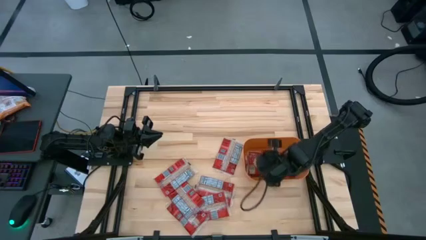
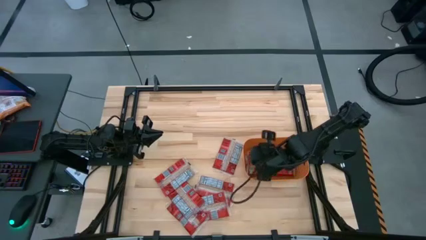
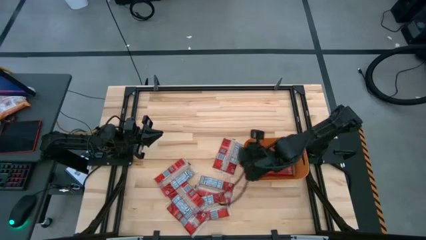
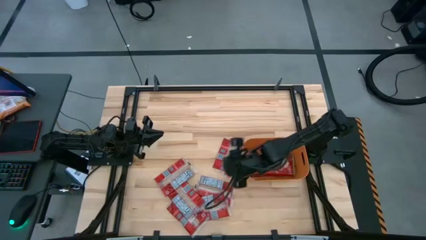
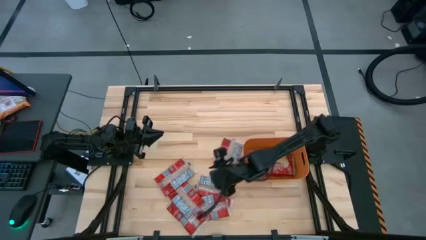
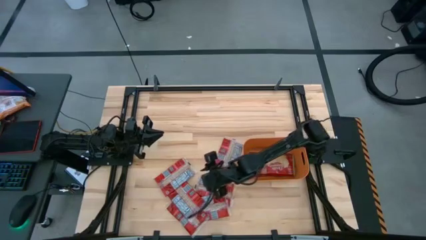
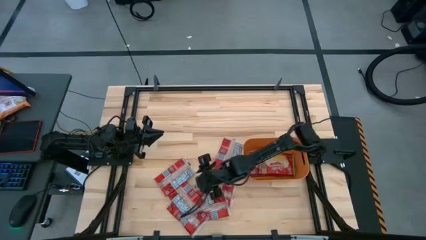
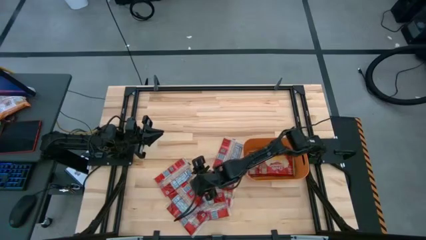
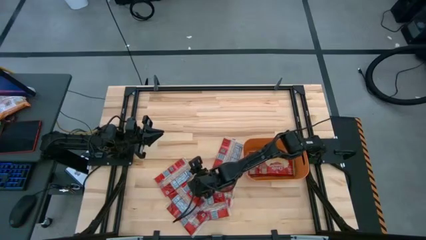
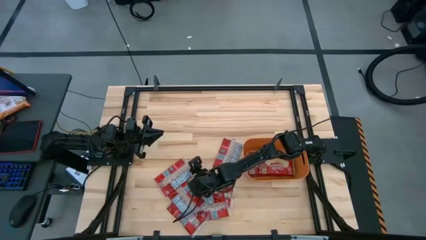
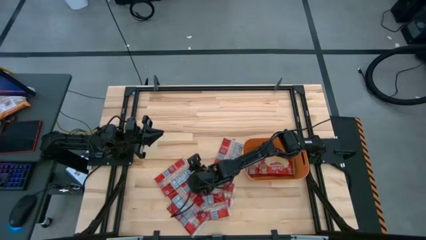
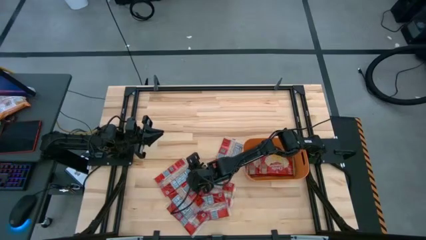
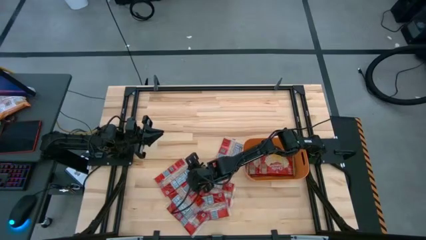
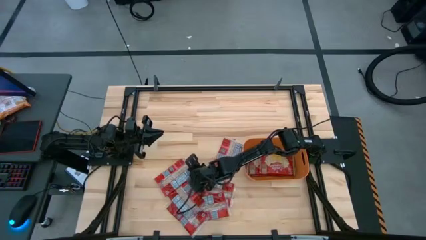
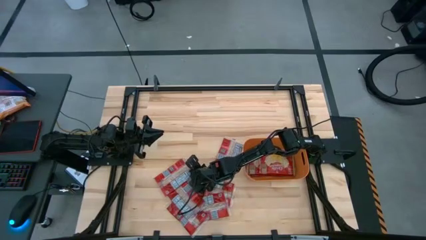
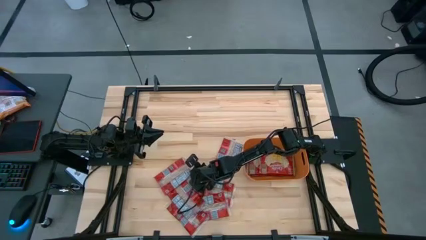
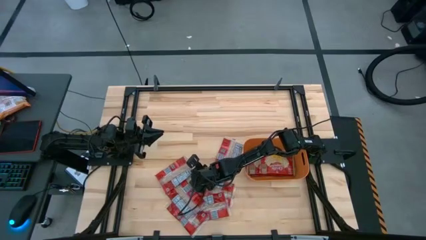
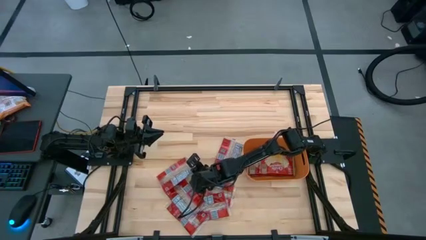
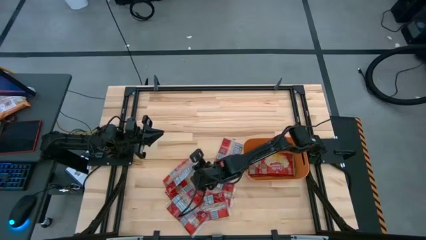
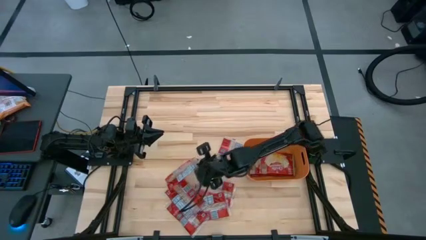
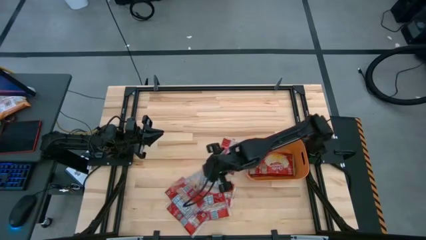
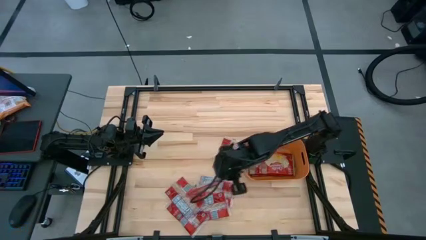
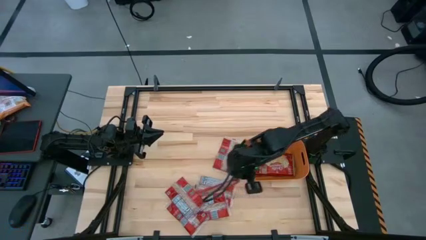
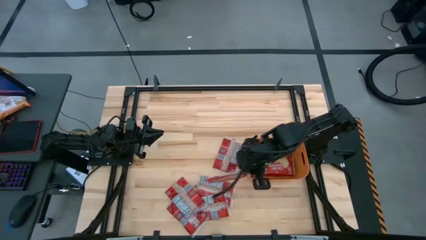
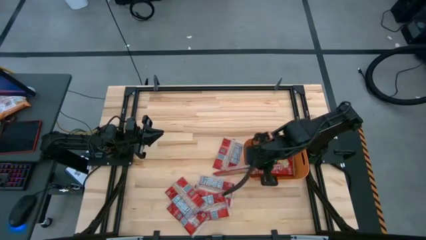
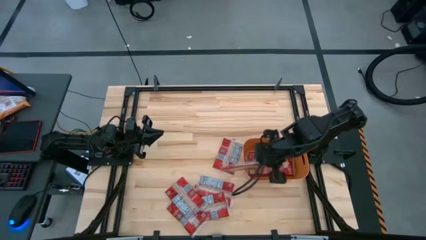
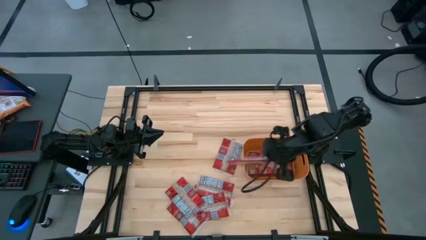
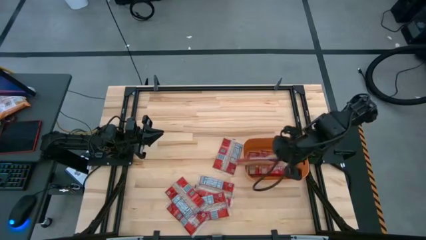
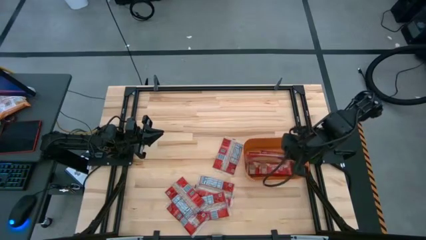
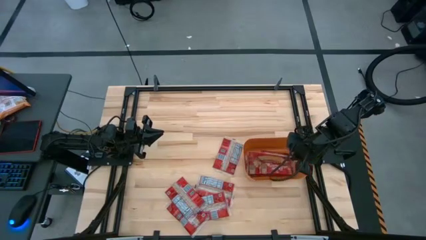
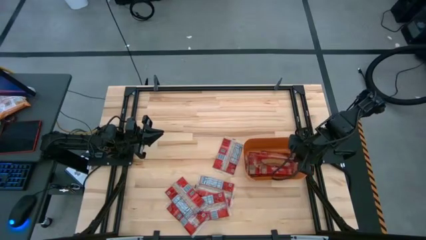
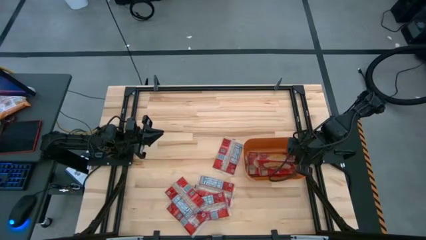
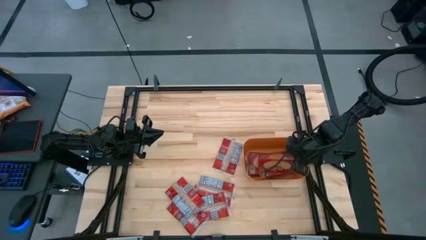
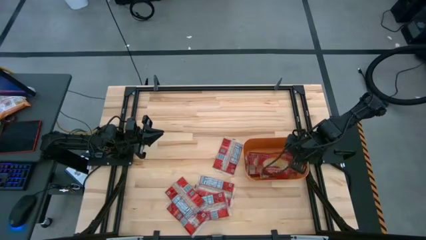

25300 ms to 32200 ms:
Task: Sort popcorn bags into baskets
Put the popcorn bag into the orange bin

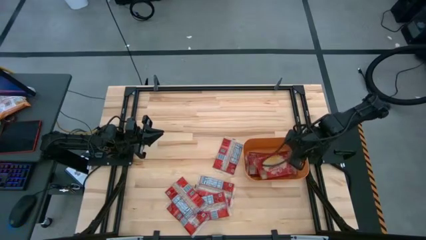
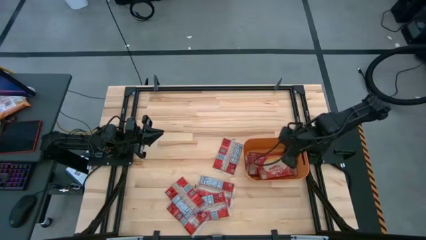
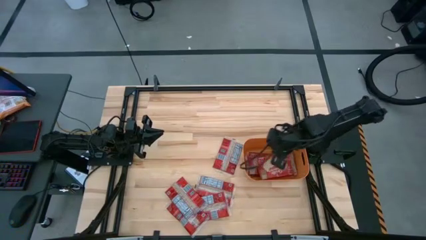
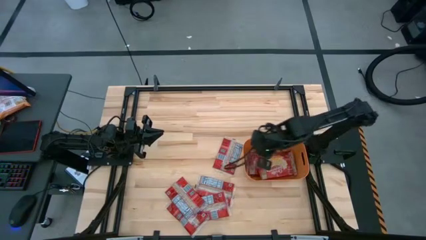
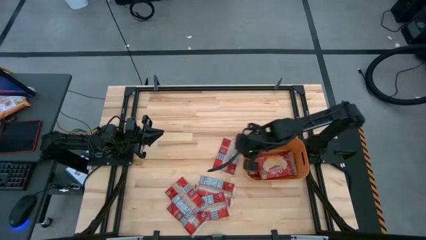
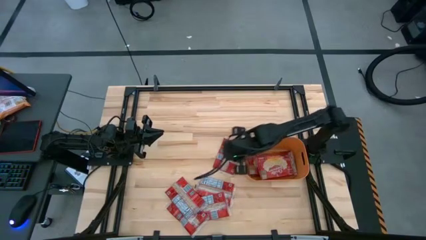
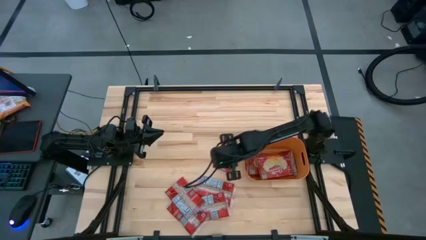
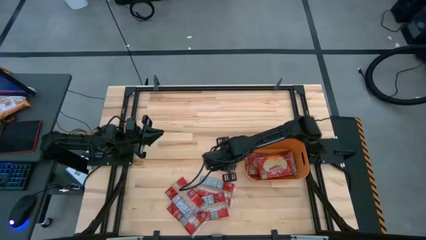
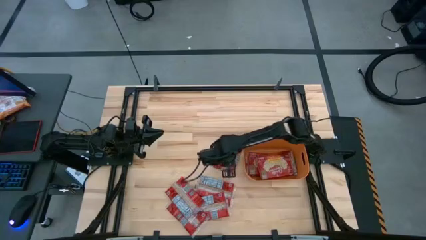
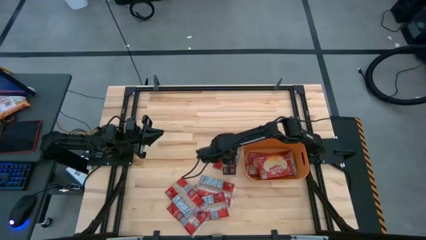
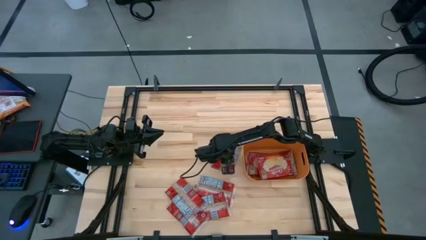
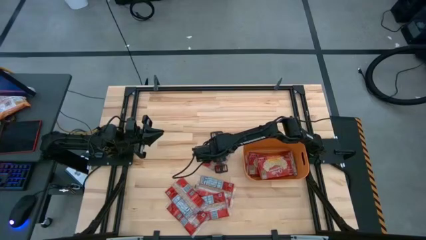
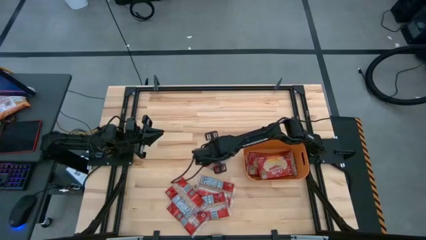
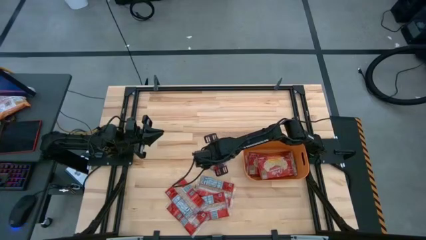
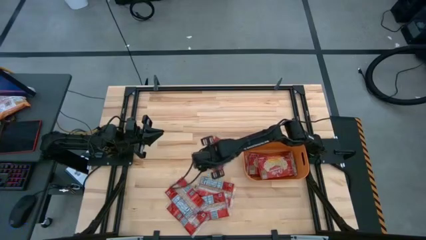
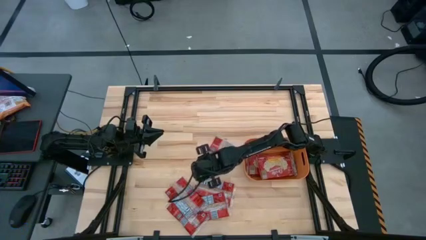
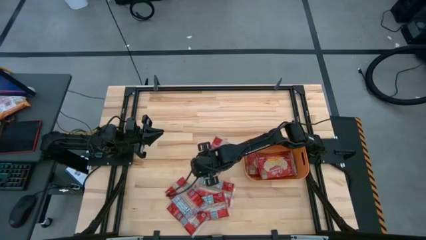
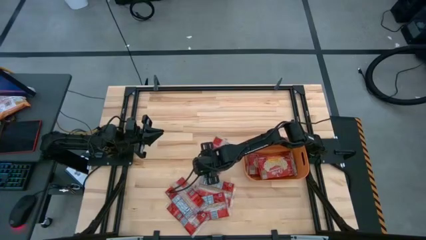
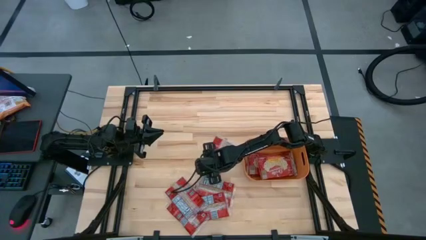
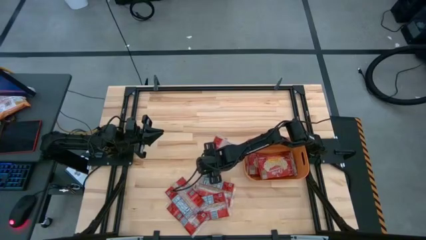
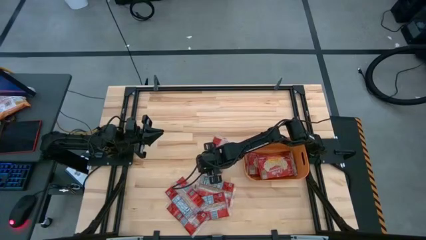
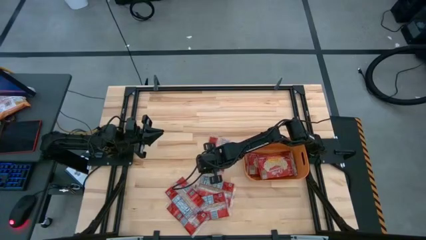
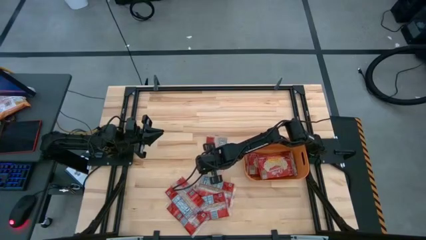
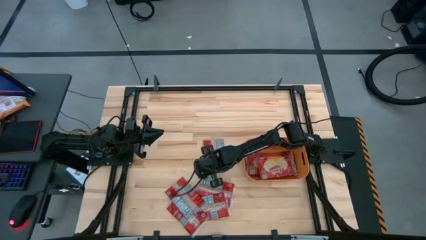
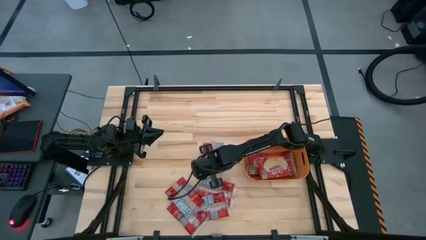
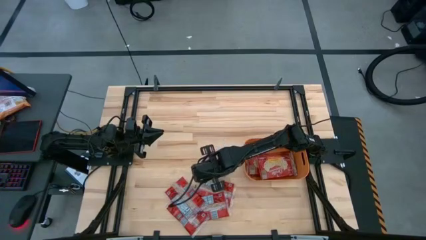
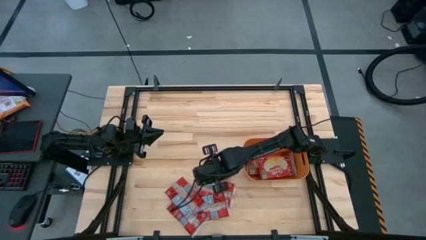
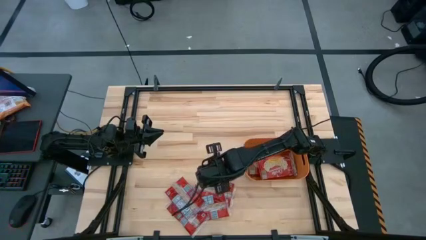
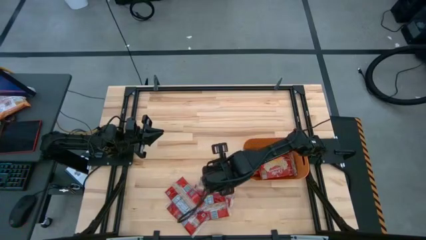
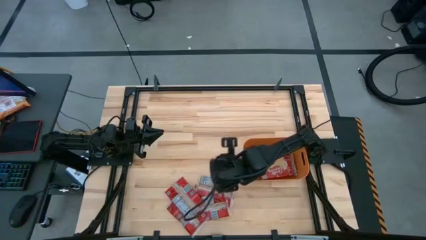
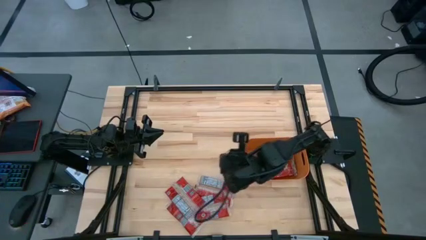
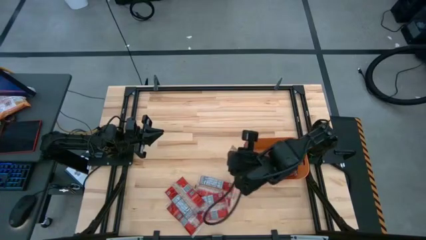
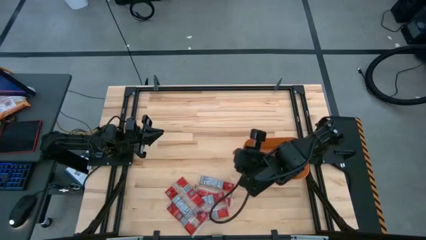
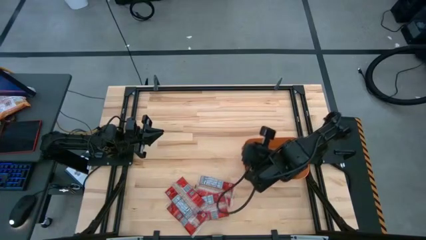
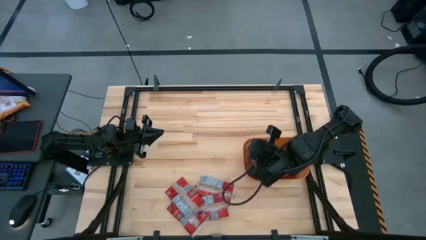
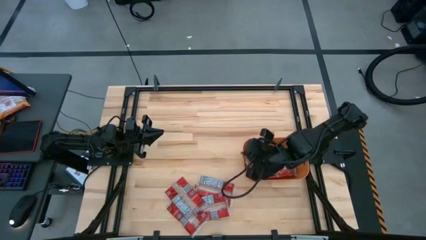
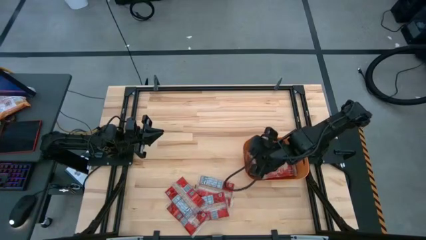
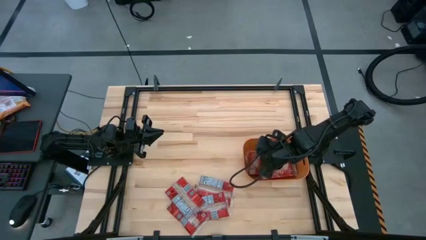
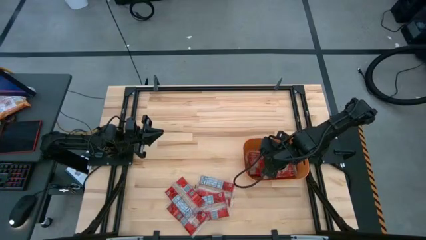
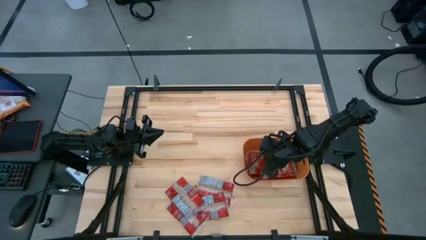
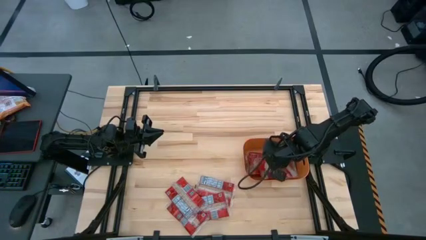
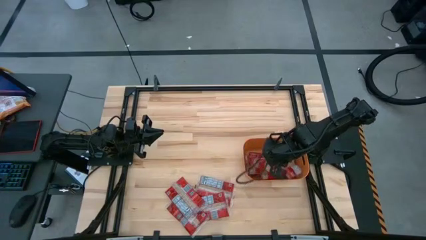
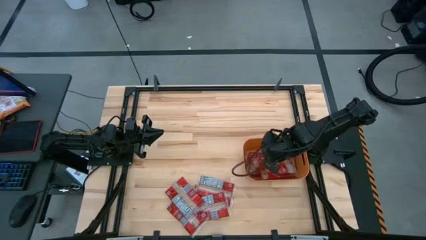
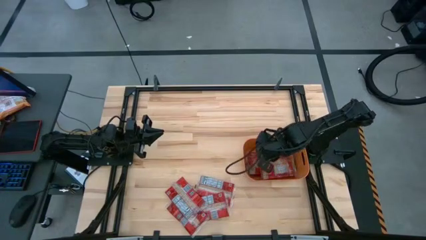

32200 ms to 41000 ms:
Put the popcorn bag into the orange bin
